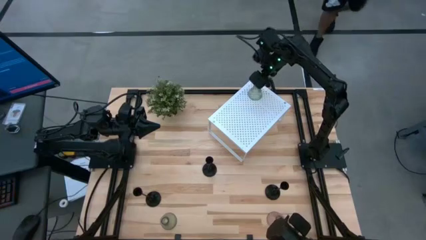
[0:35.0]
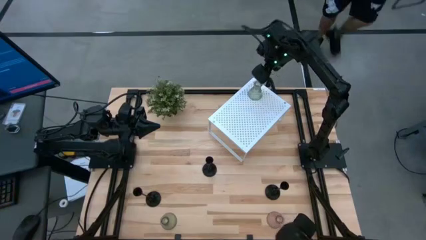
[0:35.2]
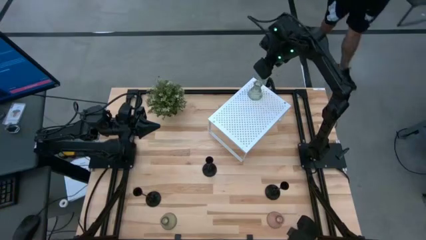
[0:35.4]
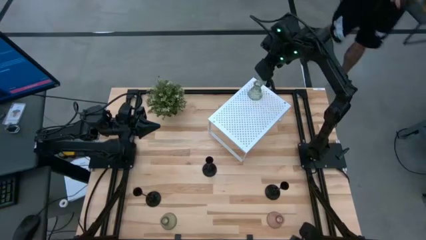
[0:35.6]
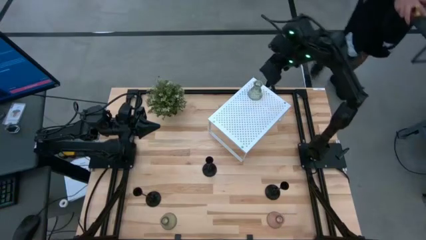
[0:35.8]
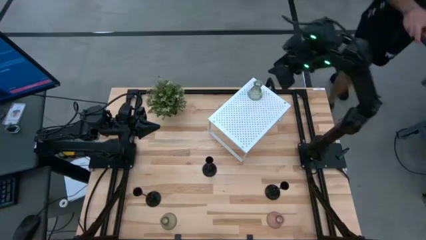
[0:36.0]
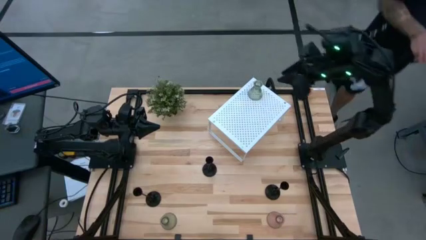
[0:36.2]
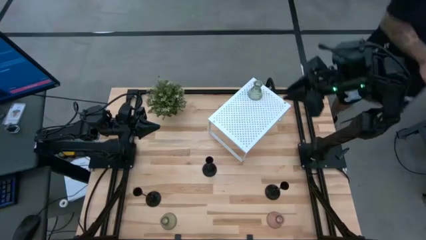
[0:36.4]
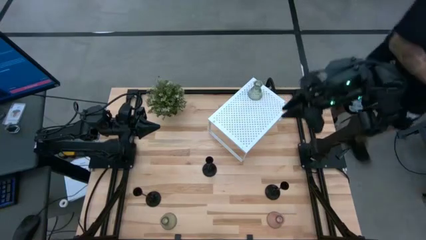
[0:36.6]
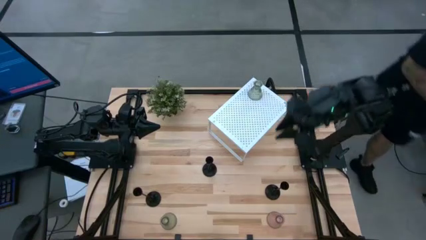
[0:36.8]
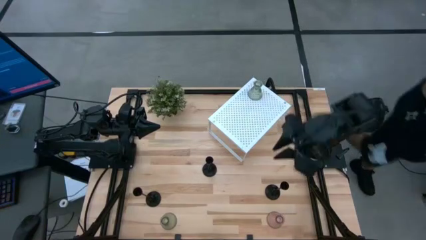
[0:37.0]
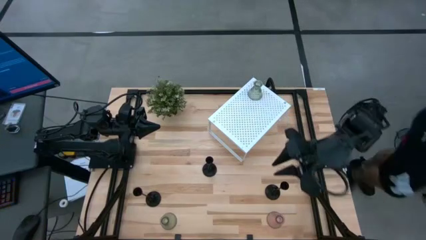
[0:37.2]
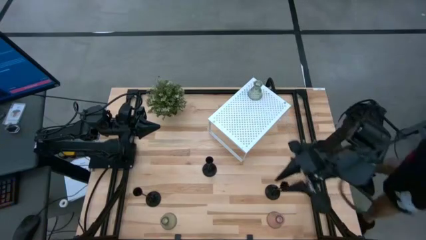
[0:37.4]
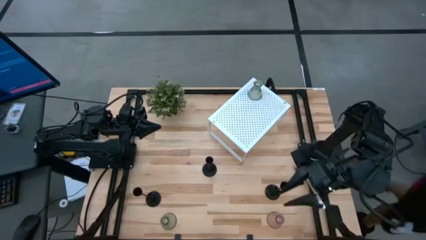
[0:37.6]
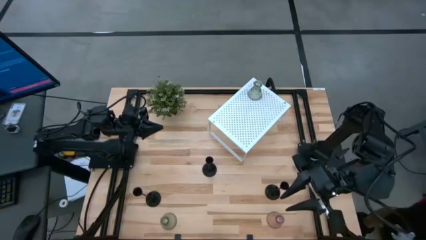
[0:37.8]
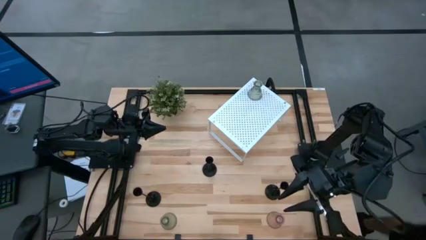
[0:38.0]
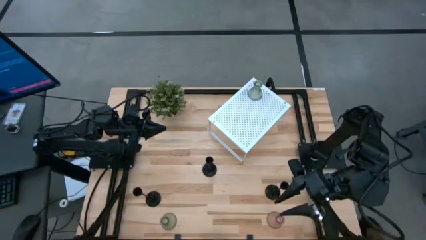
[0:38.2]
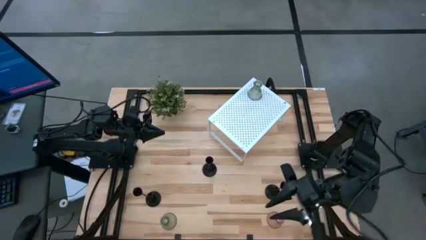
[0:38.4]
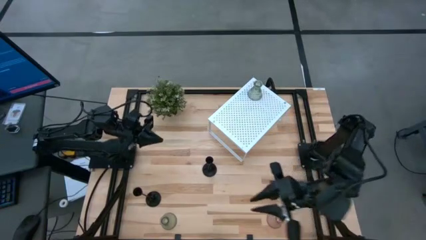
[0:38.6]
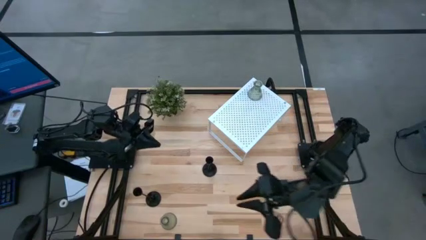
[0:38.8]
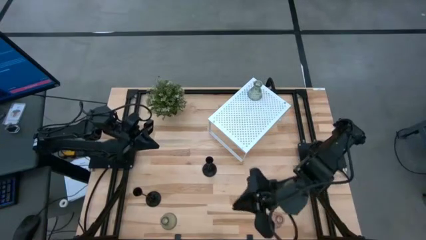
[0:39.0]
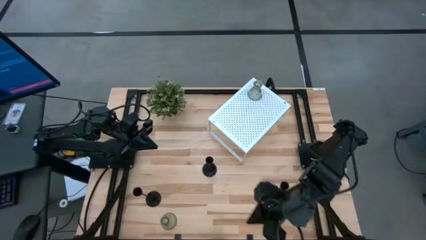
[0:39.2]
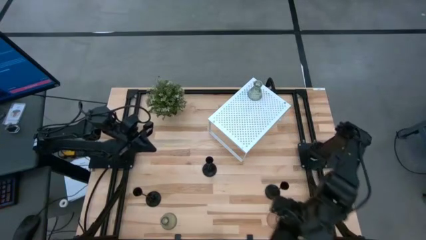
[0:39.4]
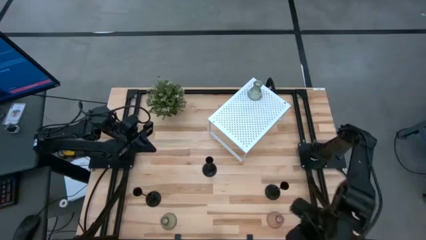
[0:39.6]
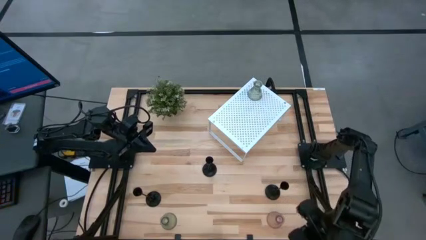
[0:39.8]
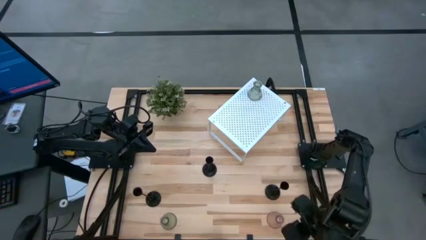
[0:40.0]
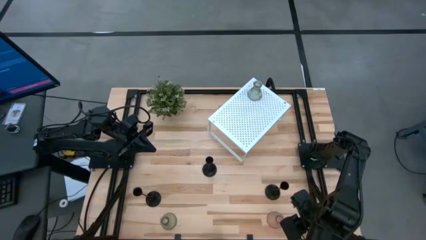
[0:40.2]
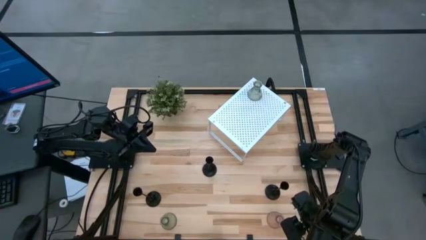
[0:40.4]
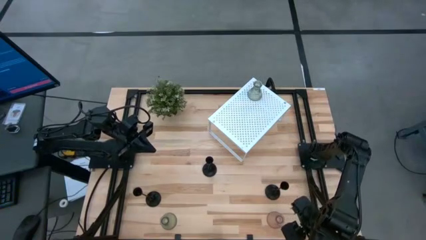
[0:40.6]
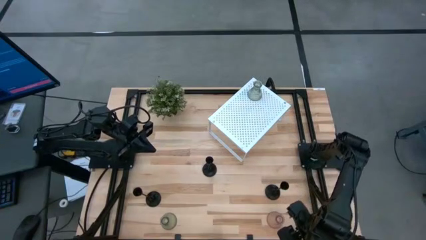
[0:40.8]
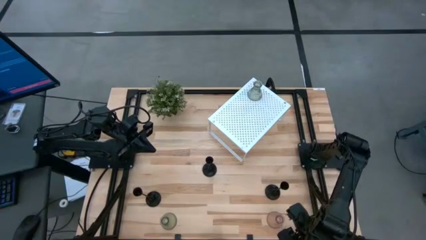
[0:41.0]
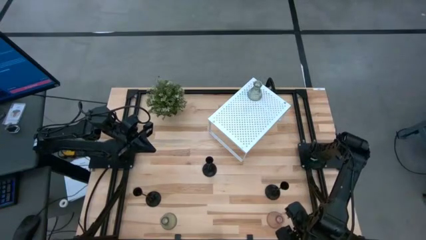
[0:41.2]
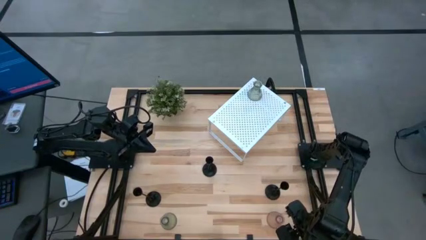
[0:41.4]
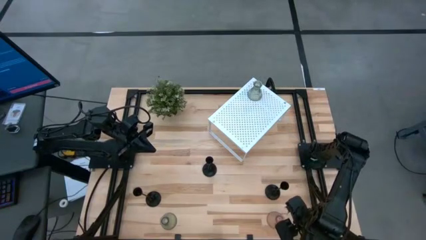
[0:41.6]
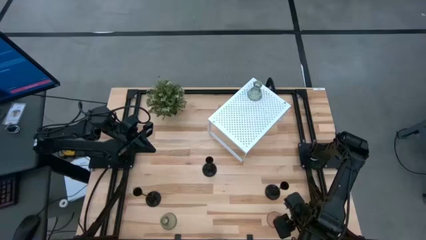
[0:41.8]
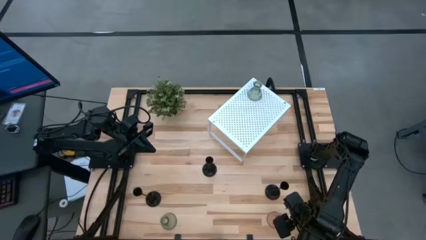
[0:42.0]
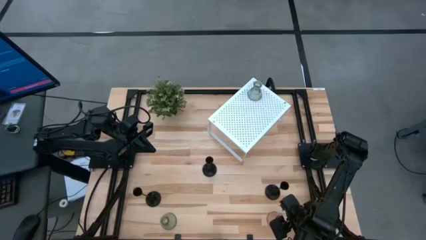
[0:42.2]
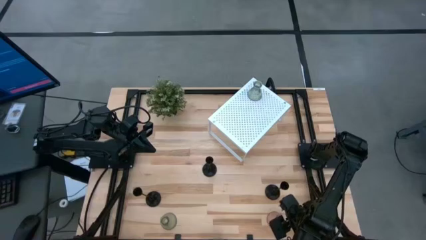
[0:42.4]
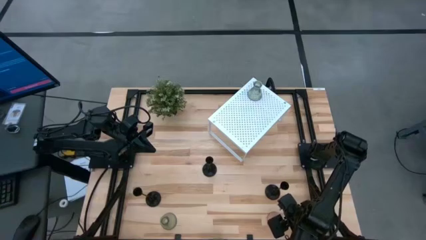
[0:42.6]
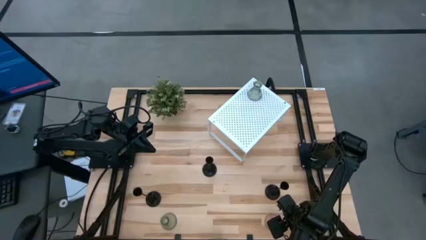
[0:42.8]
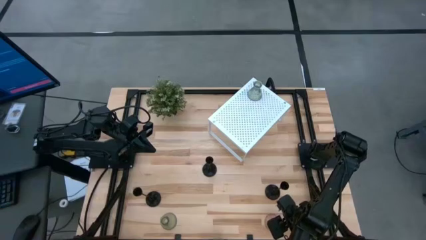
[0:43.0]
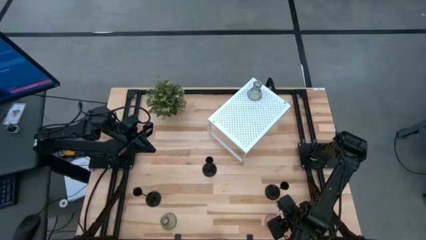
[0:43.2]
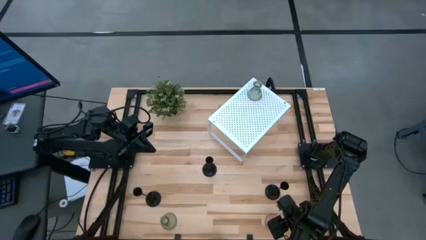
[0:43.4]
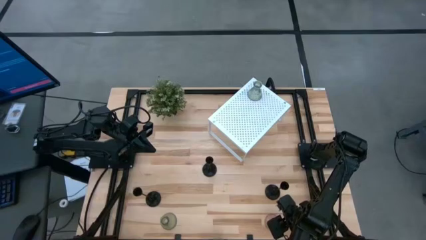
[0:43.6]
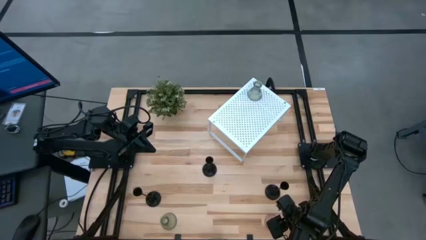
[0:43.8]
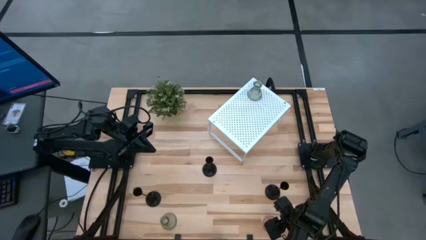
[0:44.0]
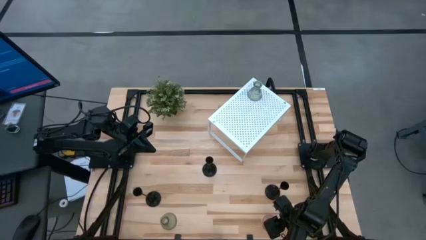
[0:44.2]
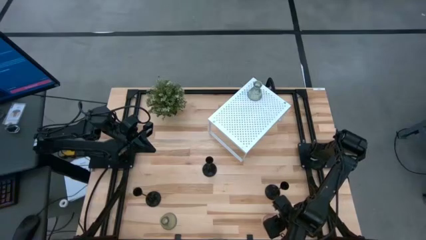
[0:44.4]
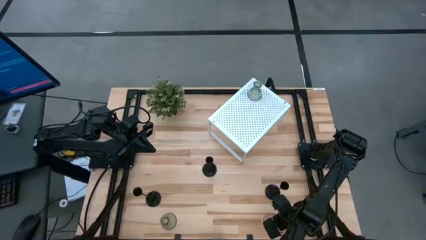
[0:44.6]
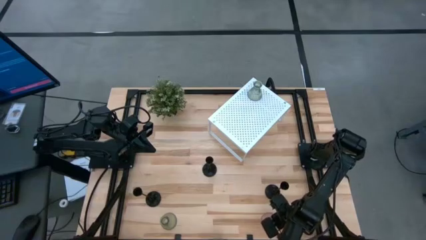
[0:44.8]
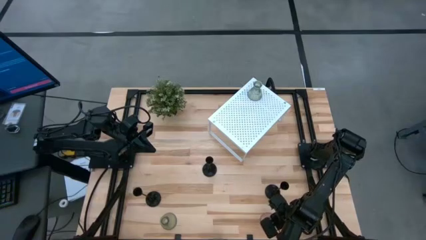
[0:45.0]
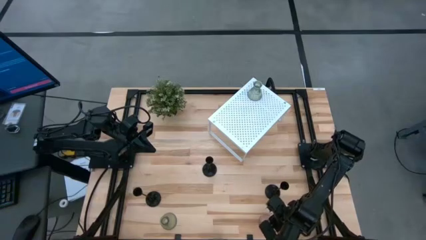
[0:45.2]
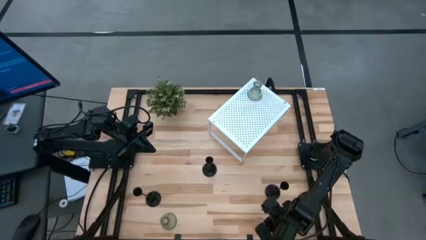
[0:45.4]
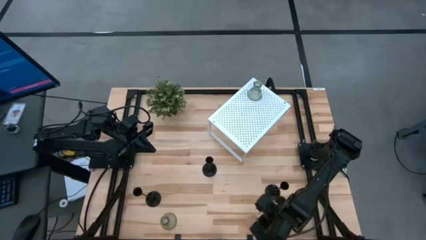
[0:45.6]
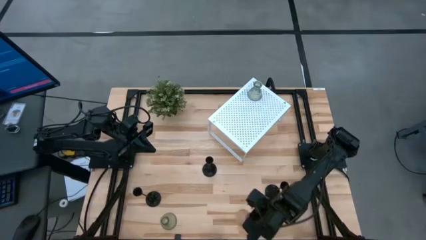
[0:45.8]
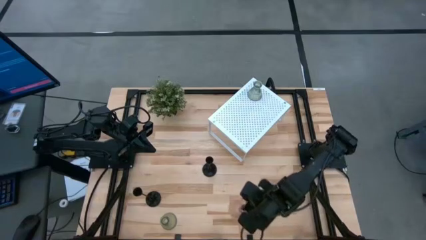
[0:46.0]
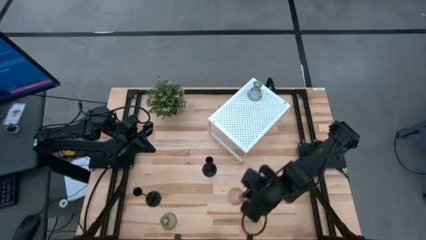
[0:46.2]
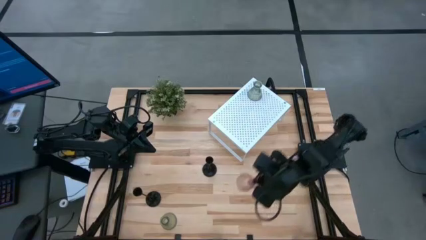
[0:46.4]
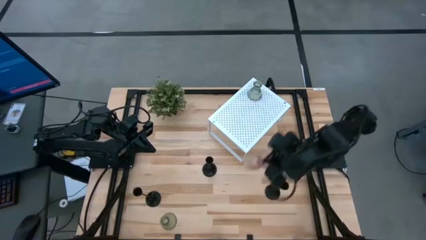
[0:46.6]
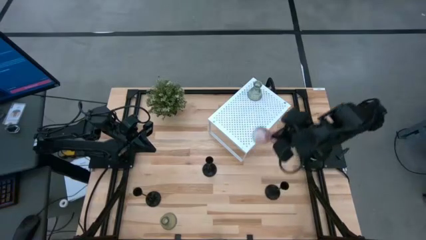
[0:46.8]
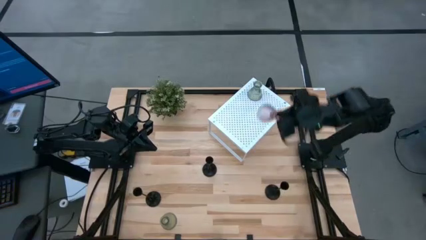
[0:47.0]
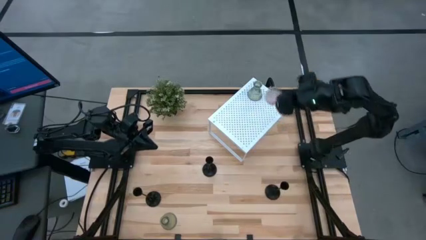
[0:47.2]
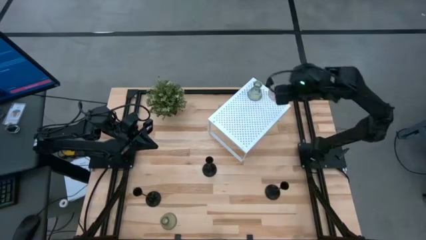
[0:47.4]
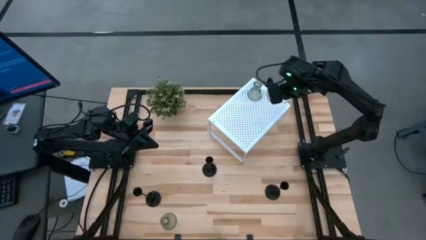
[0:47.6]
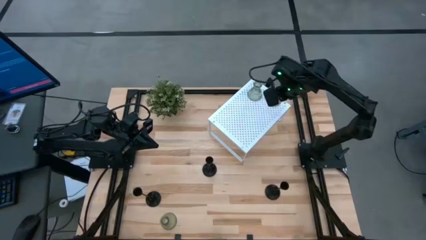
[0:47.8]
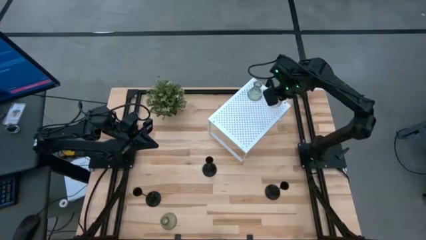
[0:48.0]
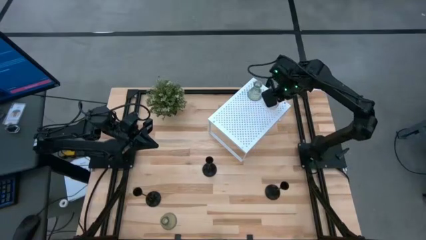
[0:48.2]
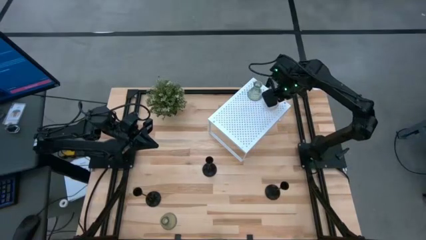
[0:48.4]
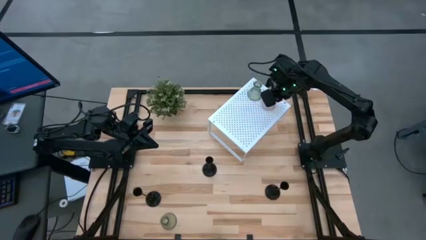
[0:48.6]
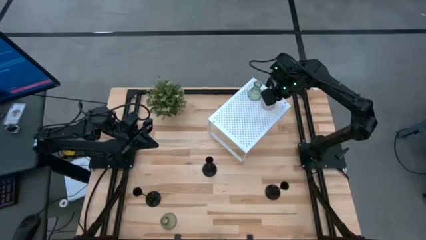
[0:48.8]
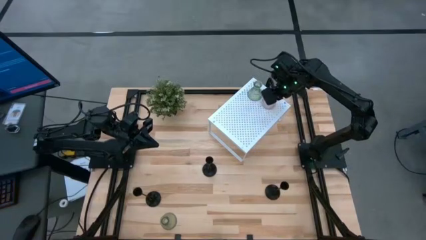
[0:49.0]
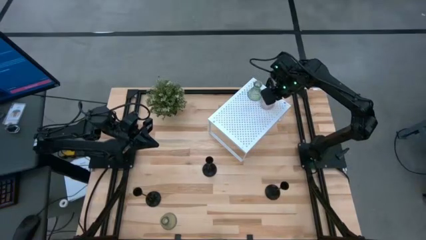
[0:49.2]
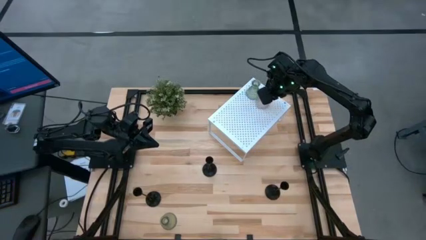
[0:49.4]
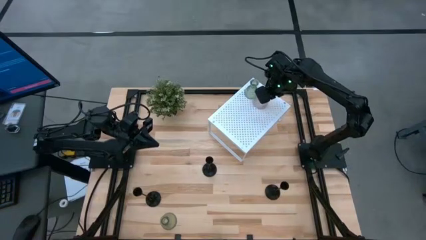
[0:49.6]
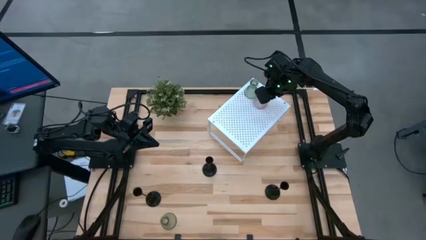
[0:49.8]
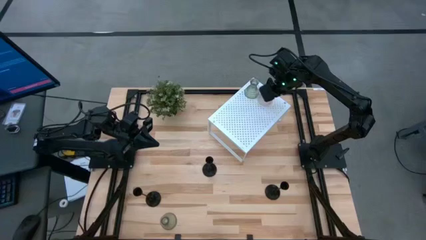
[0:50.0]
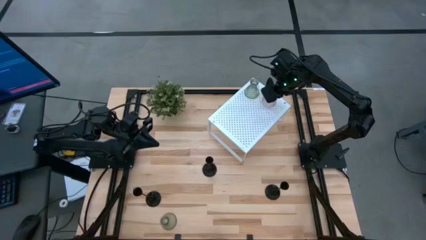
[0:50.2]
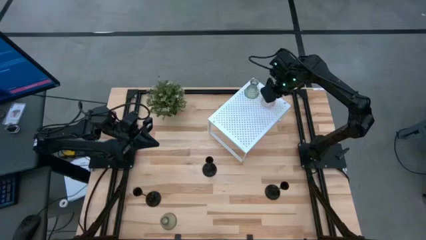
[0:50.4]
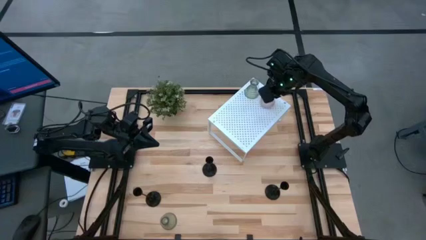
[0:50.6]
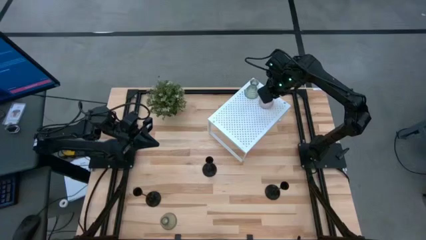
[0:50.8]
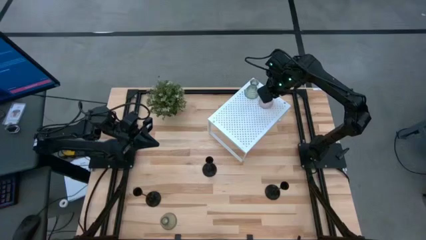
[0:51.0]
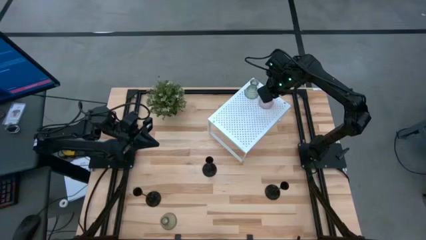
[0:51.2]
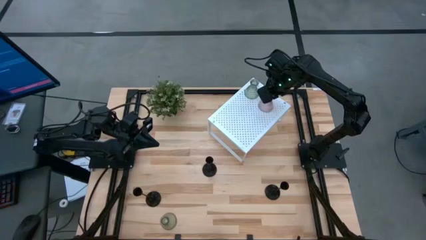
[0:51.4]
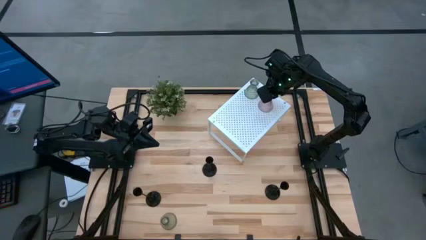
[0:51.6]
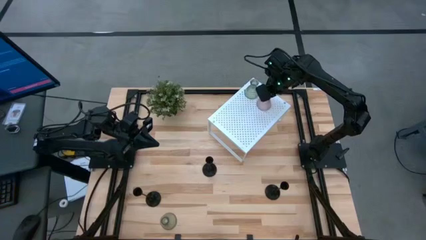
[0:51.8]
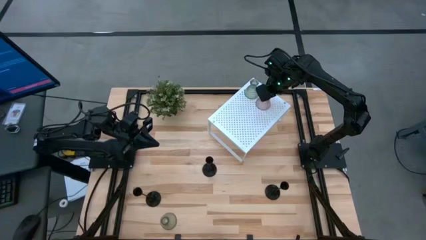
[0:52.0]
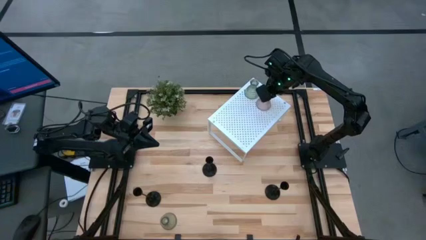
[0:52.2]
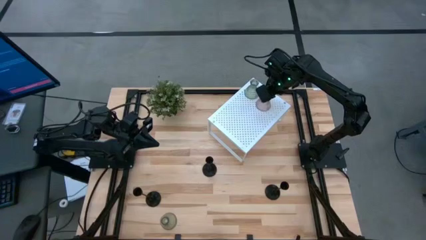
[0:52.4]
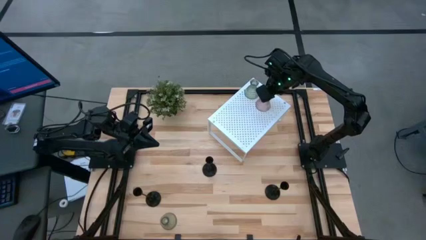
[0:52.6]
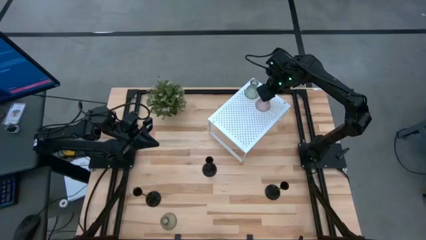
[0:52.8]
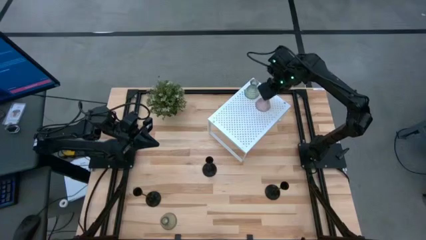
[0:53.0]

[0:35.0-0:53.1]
Task: Pick & Place candle stick holders
Put the pink glass candle holder on the shelf aligned with the other green candle holder
